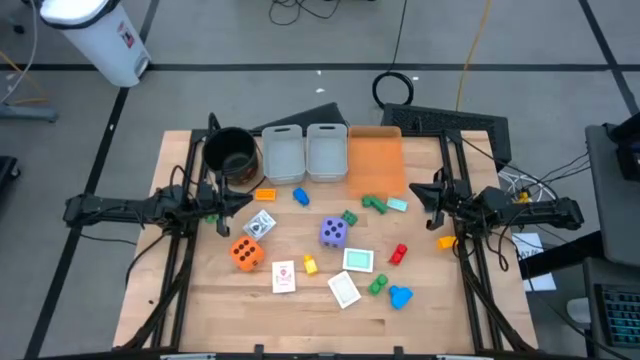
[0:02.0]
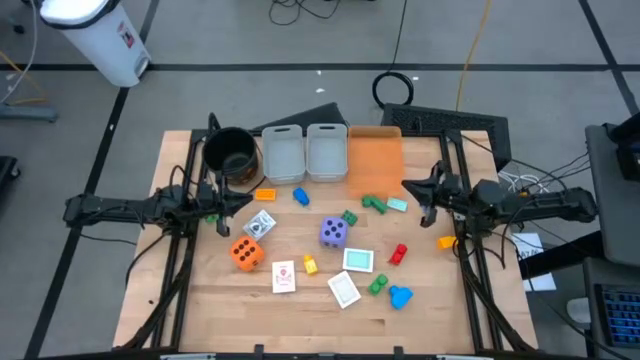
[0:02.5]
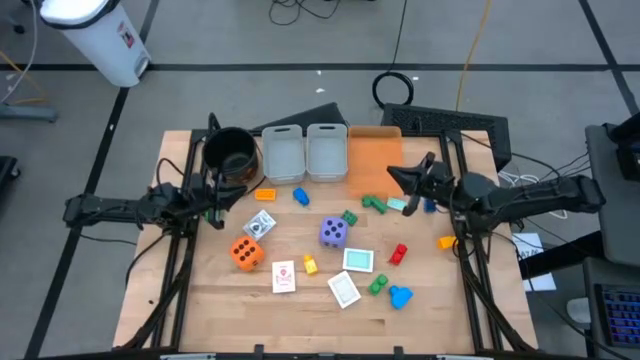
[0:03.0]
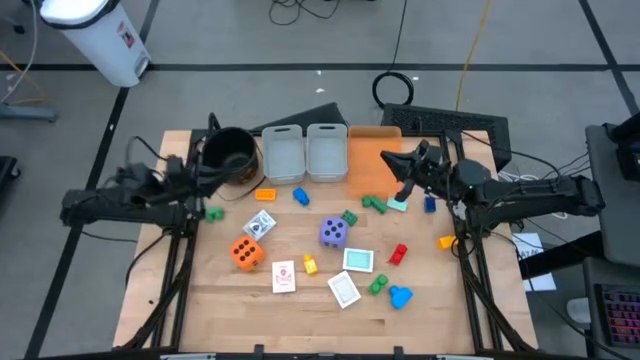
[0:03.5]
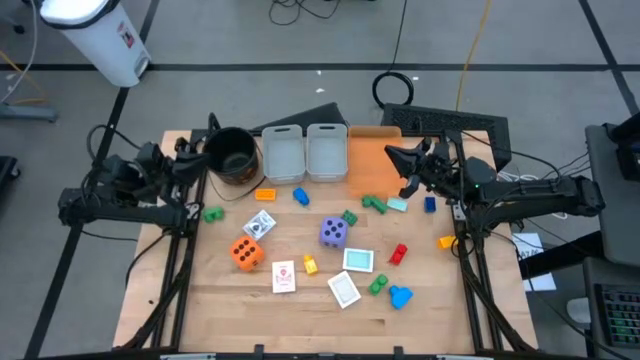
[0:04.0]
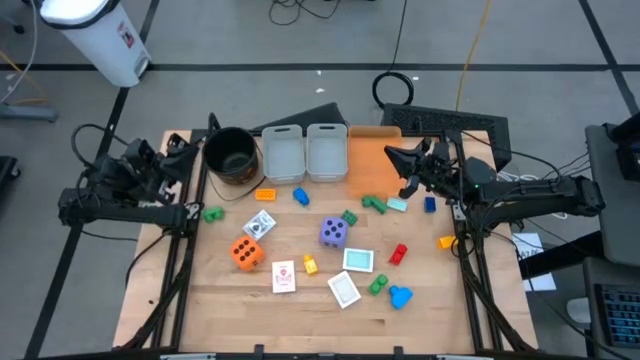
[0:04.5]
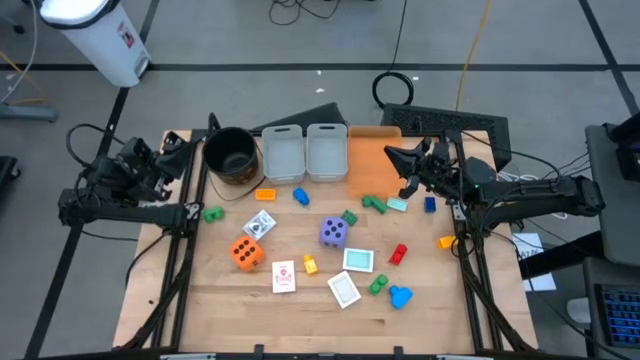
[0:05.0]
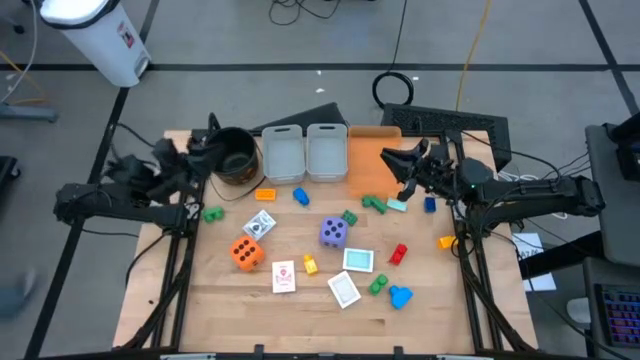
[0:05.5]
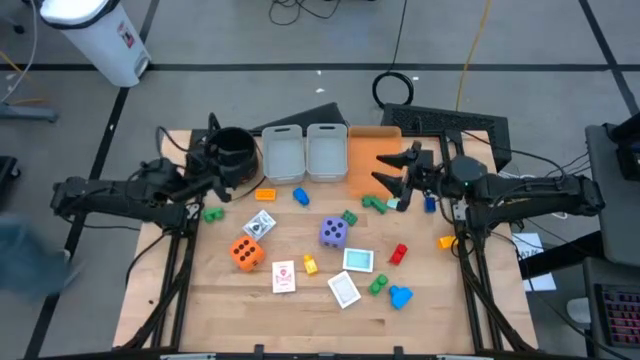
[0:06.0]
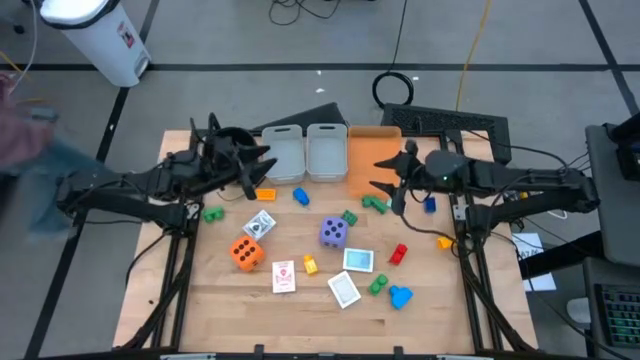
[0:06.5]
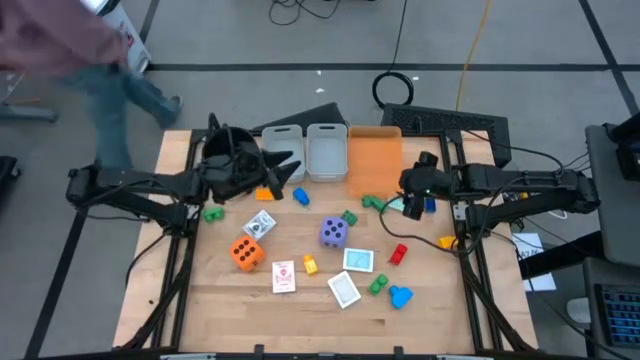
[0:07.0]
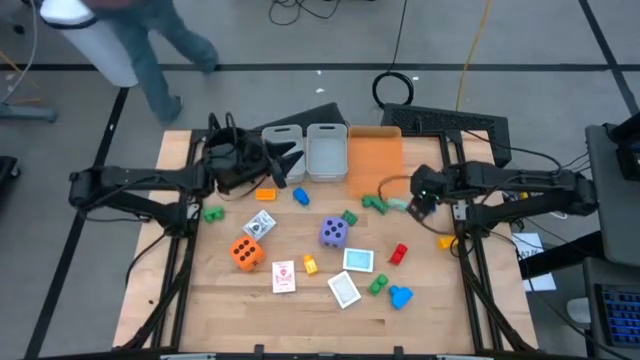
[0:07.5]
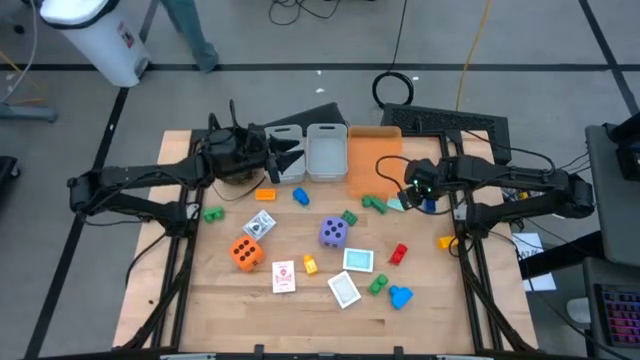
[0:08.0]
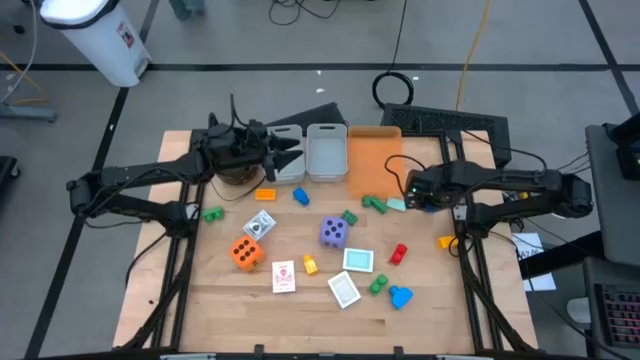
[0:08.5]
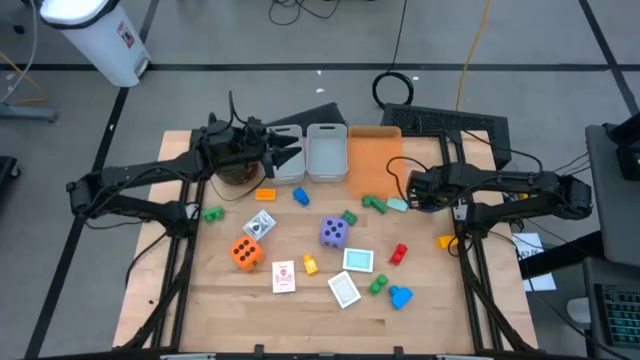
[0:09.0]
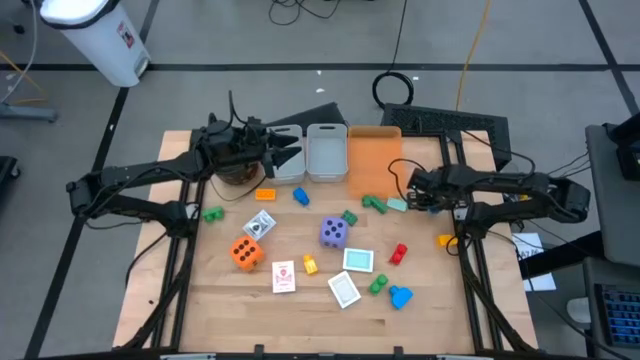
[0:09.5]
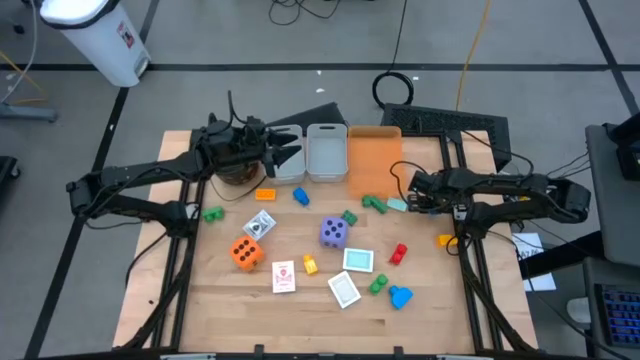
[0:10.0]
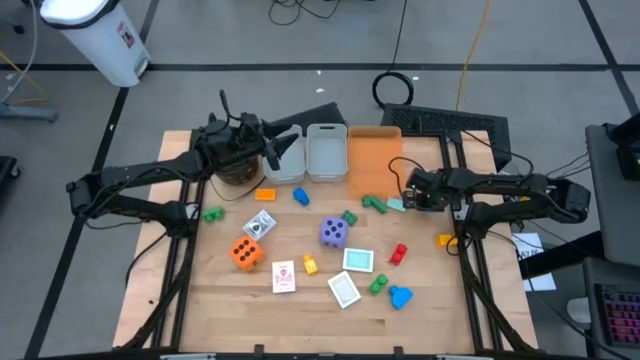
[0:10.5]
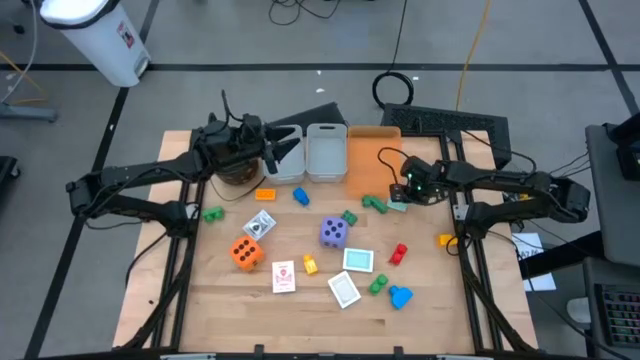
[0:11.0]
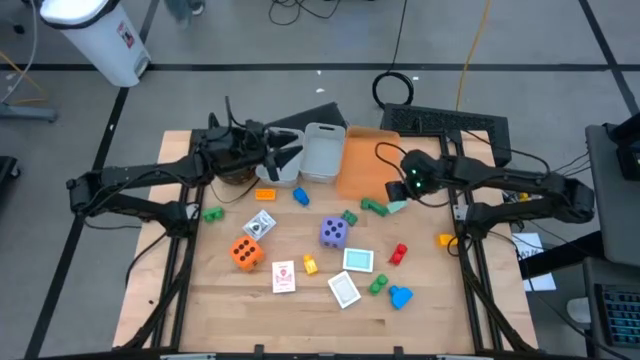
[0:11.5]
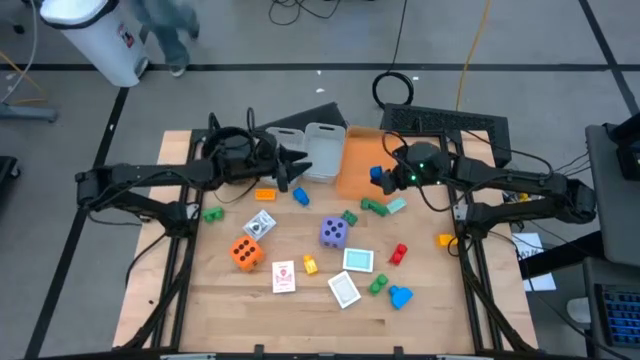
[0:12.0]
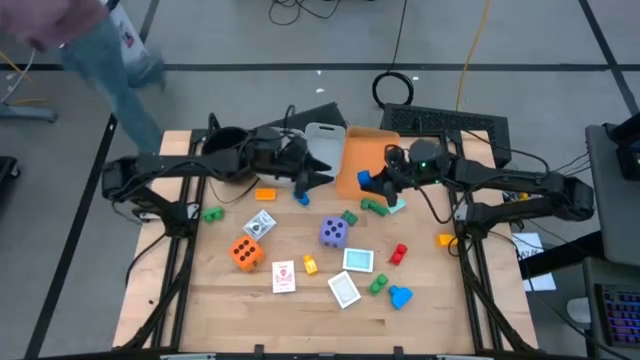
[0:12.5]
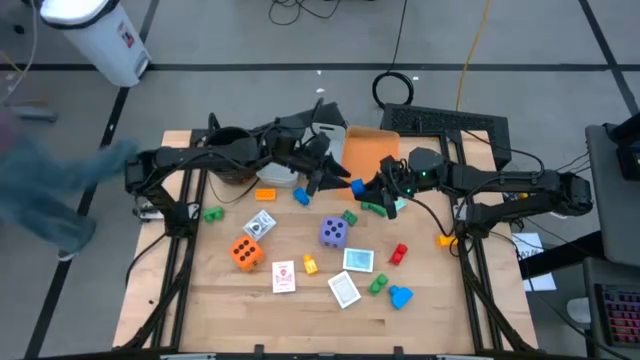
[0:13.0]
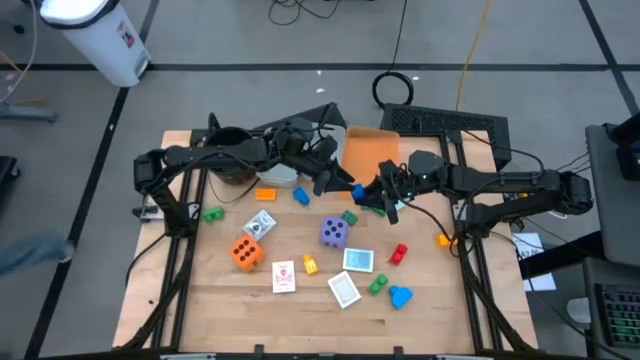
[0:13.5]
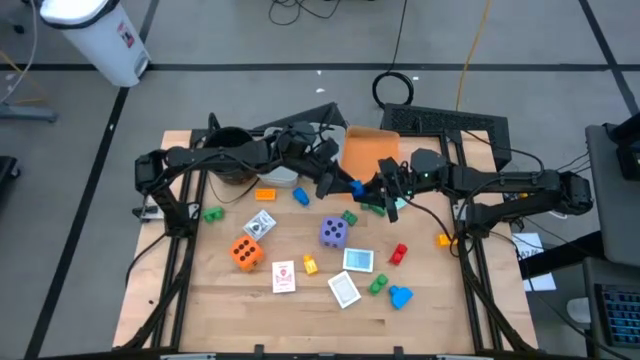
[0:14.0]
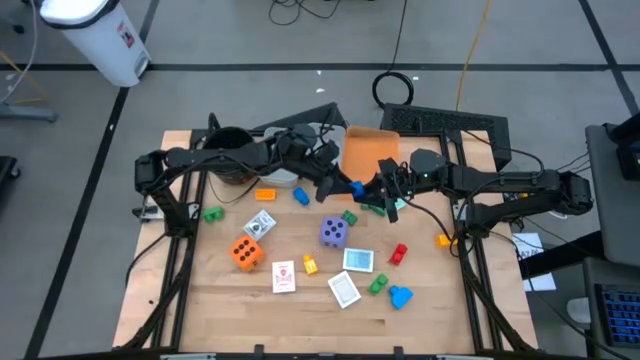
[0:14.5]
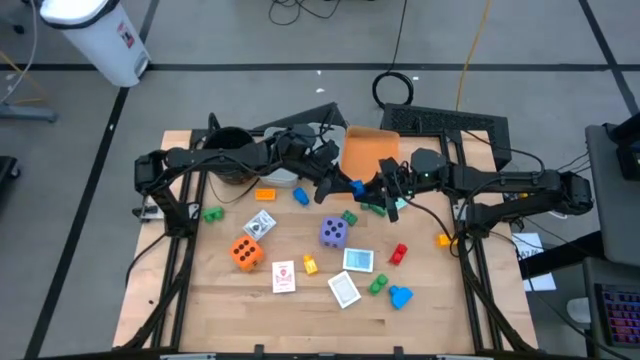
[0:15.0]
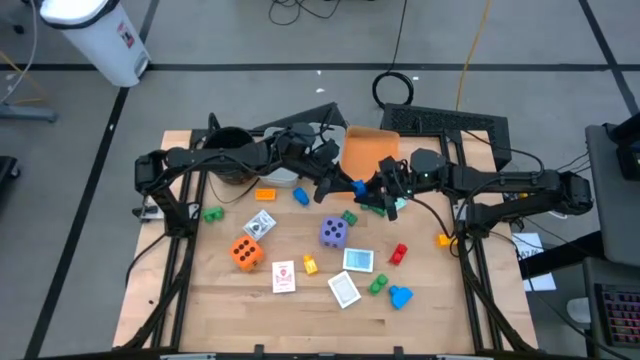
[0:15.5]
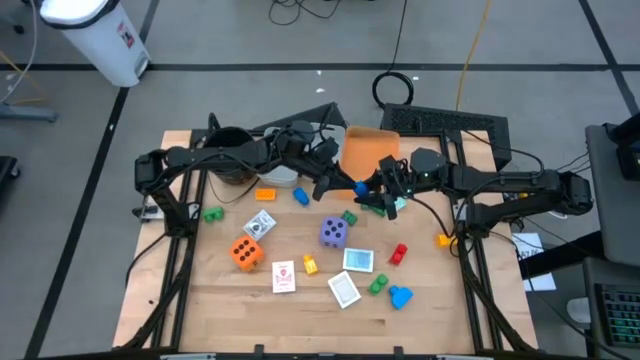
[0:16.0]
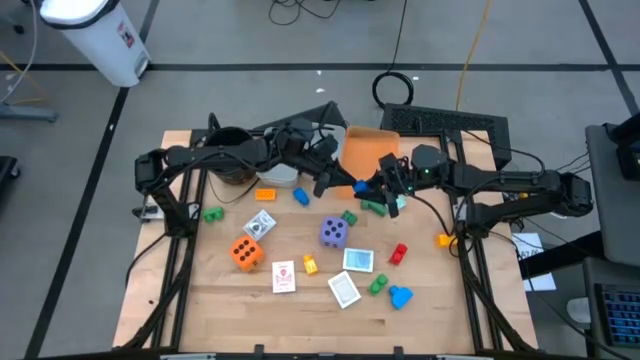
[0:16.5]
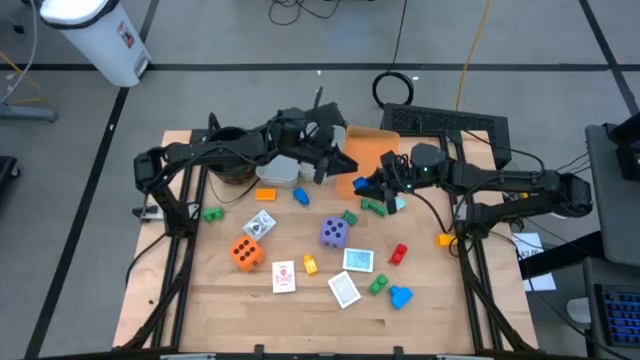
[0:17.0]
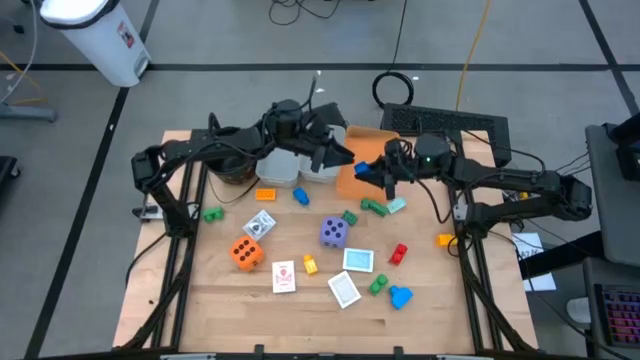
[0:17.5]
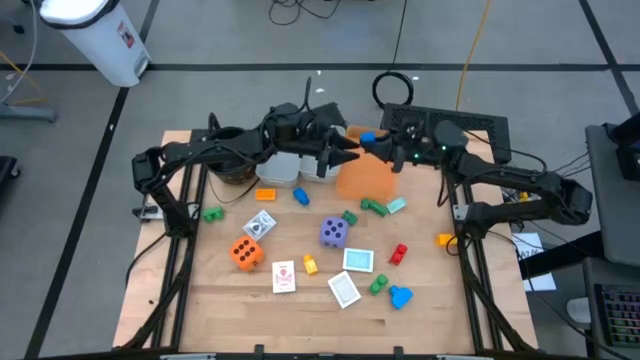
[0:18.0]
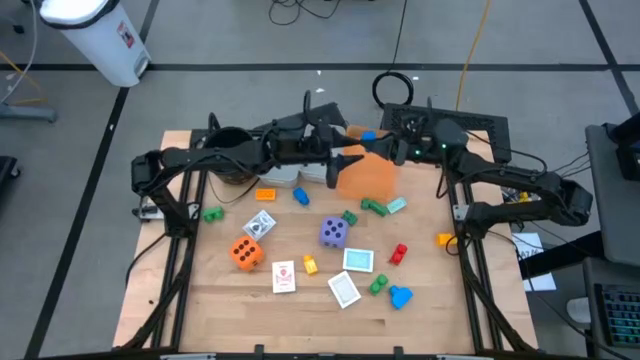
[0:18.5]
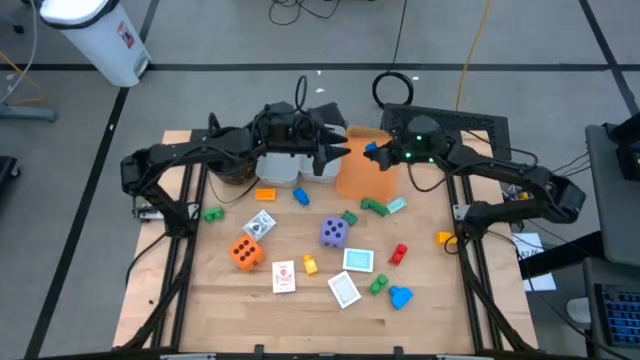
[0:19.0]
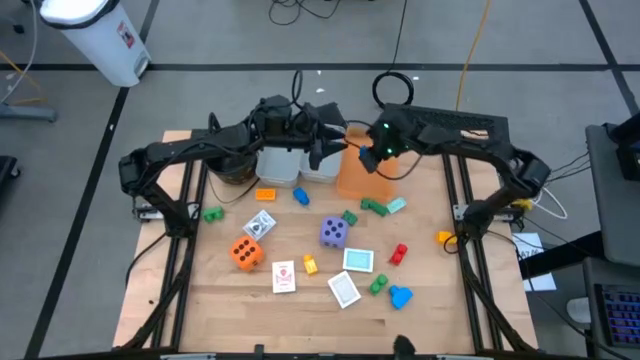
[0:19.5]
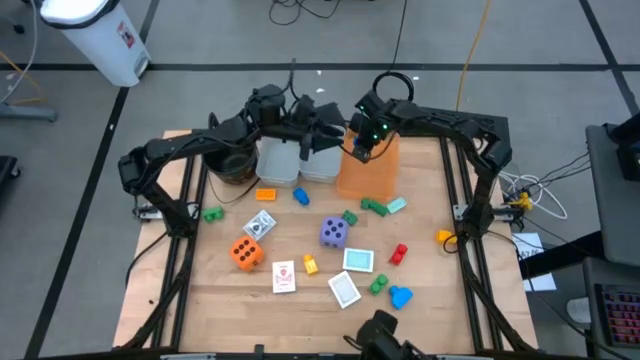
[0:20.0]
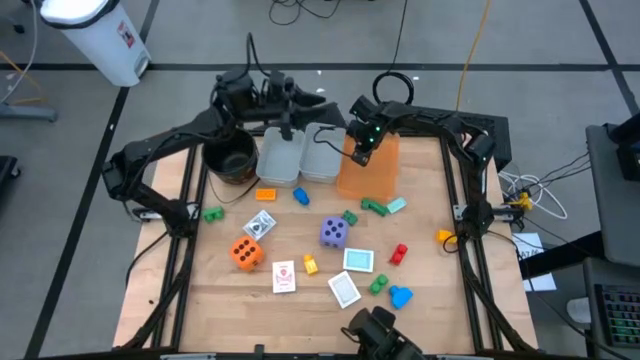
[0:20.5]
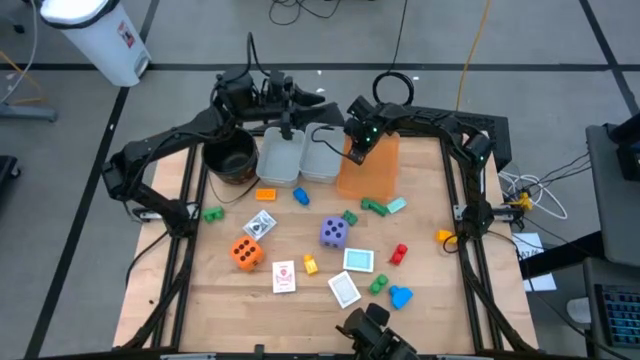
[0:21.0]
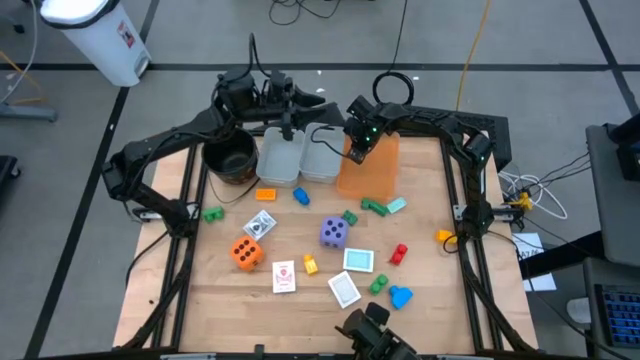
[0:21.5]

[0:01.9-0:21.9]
Task: Pick & Place Toys
Put the top right blue game piece into the orange bin
